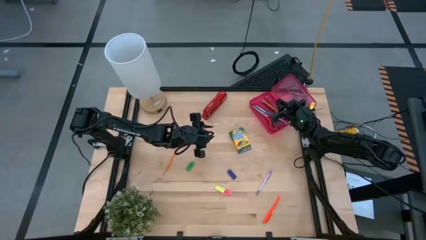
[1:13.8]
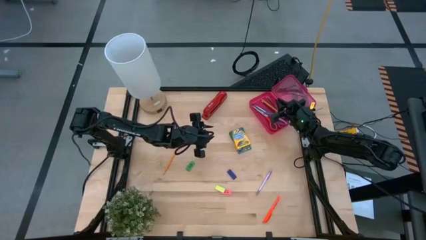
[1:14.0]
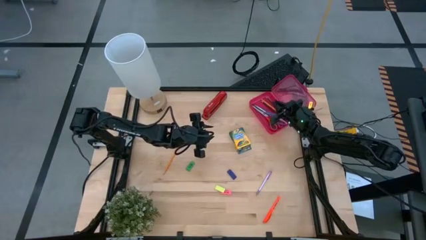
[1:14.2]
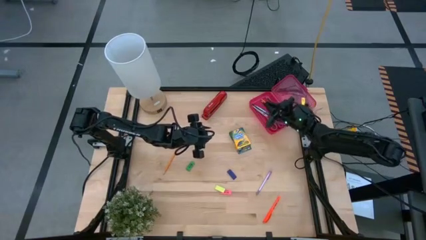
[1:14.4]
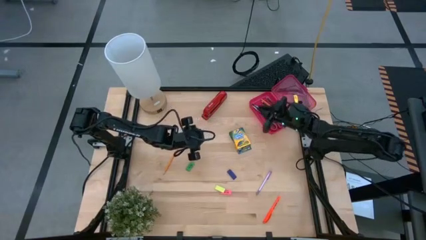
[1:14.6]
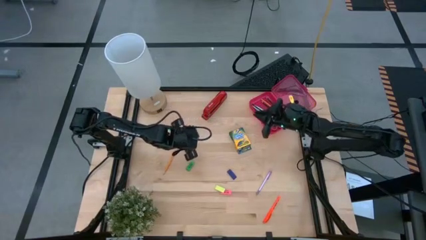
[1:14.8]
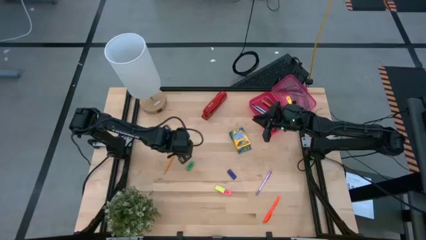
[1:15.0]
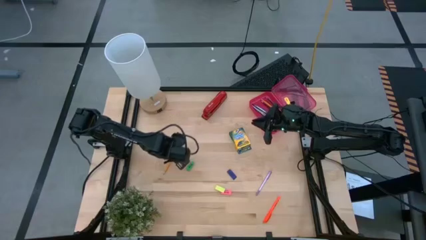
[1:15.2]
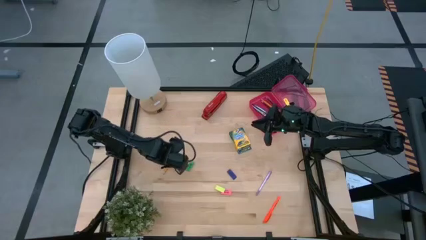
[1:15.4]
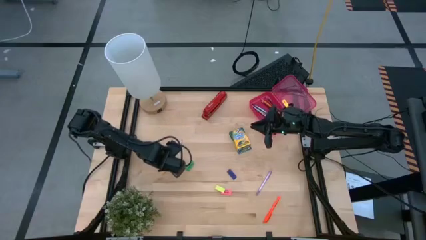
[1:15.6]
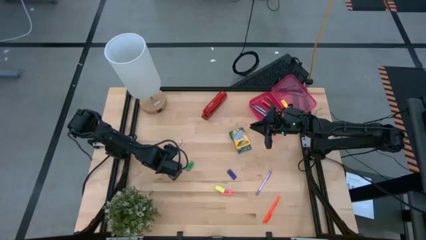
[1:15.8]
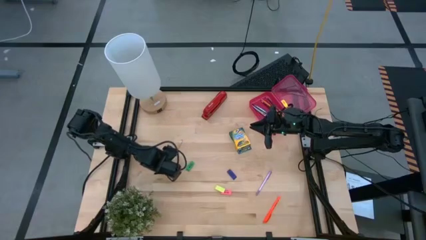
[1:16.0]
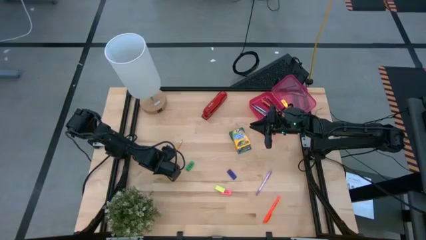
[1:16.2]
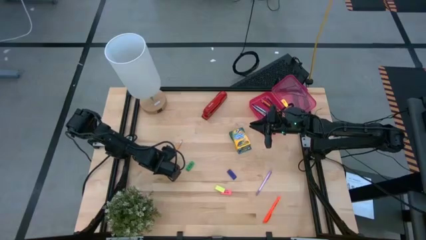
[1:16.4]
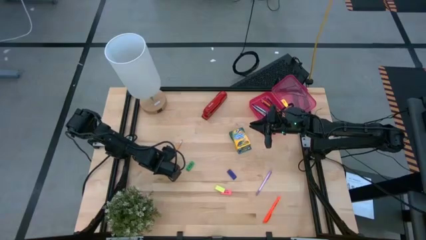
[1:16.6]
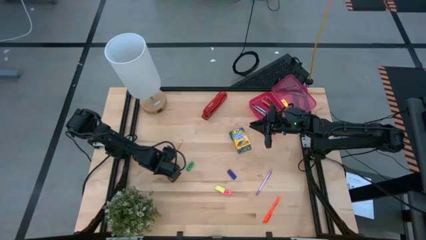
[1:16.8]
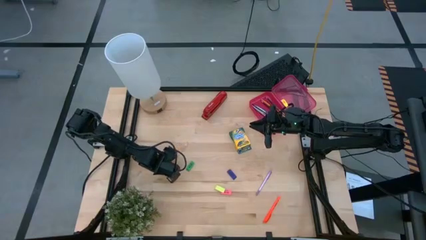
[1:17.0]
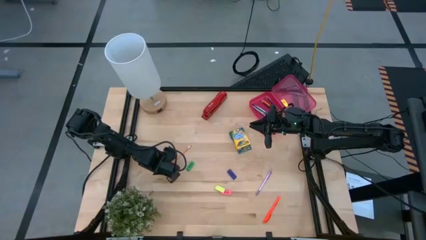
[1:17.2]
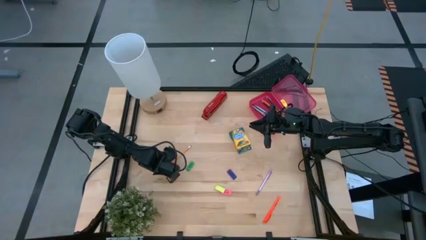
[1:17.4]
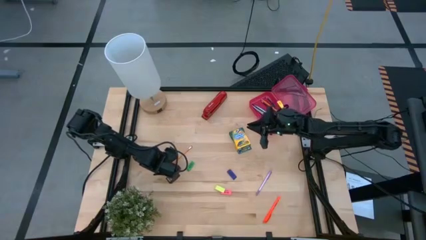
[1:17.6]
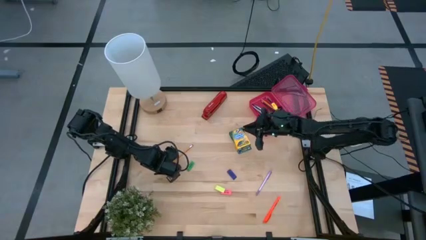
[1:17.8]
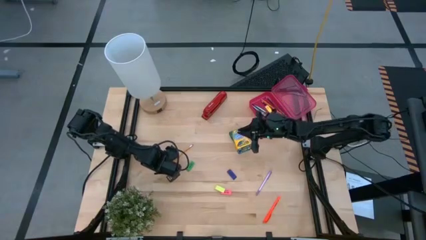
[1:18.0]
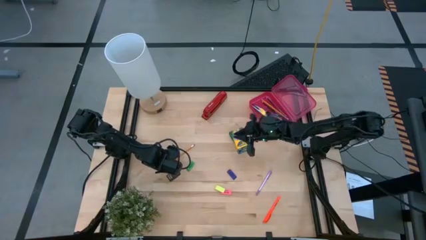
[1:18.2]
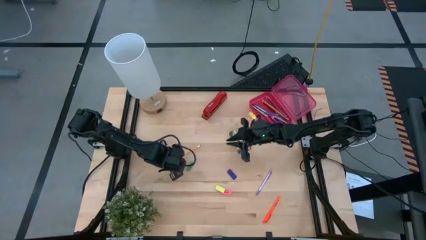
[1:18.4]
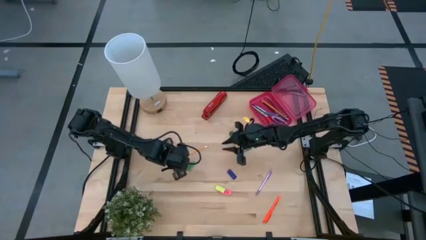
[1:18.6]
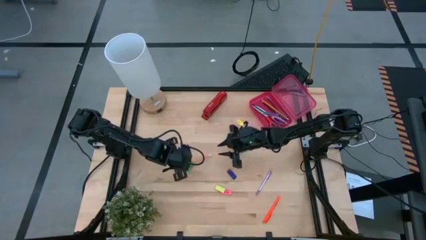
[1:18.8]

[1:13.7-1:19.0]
Task: Pack school essentials
Put the orange pencil into the pink supply box

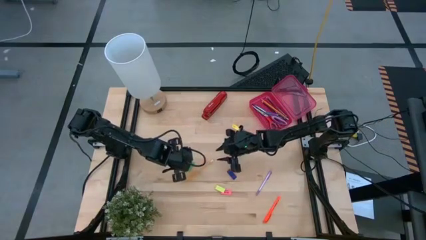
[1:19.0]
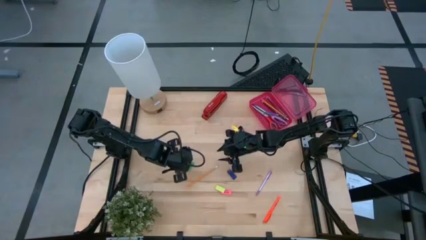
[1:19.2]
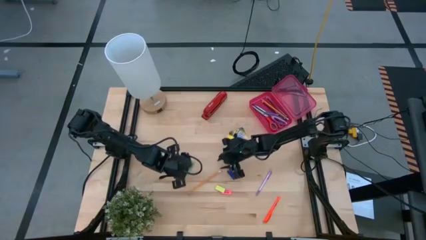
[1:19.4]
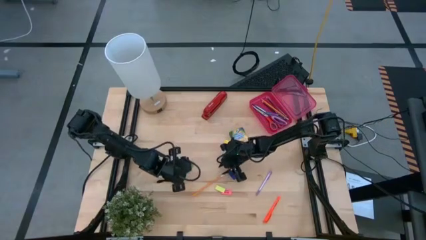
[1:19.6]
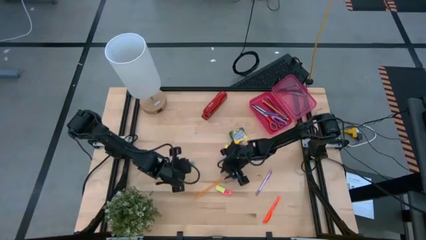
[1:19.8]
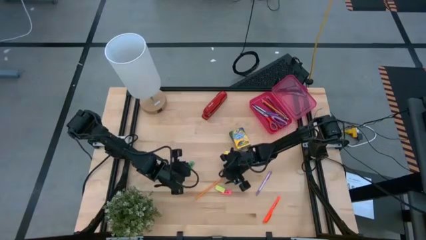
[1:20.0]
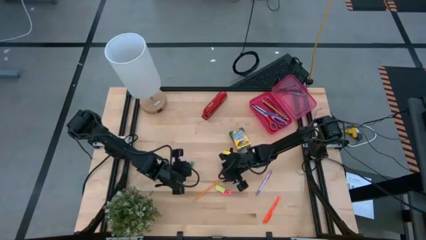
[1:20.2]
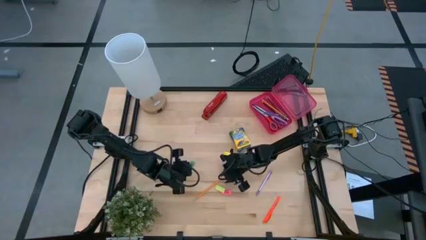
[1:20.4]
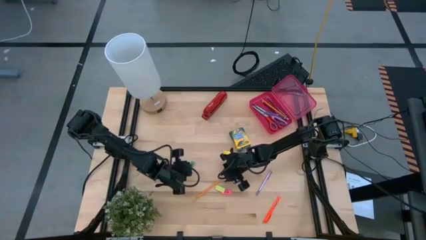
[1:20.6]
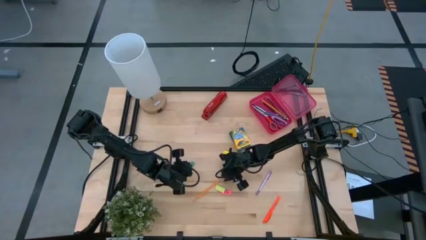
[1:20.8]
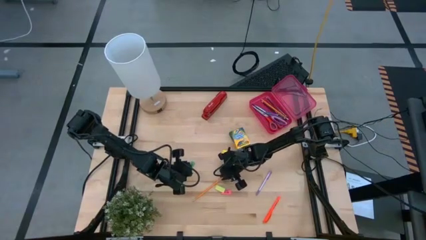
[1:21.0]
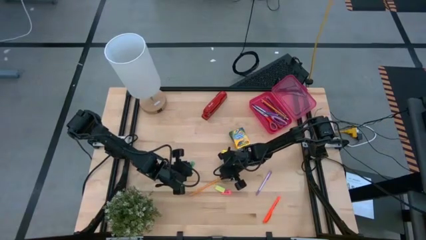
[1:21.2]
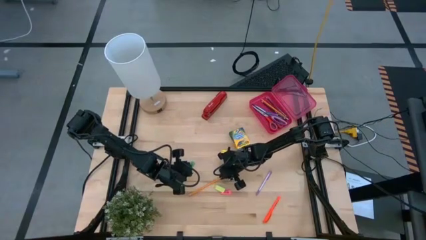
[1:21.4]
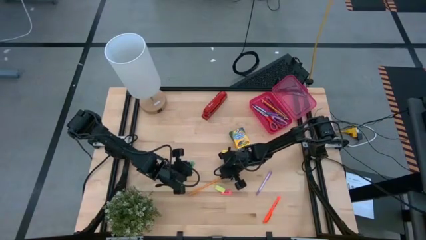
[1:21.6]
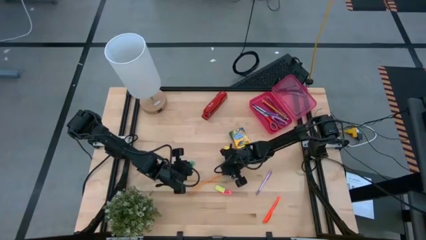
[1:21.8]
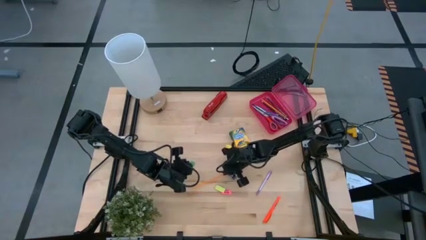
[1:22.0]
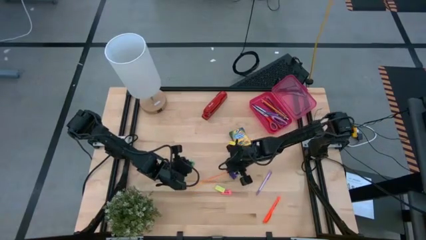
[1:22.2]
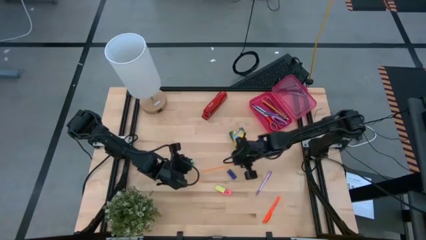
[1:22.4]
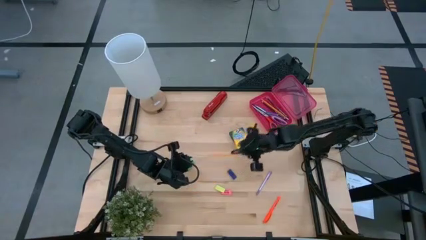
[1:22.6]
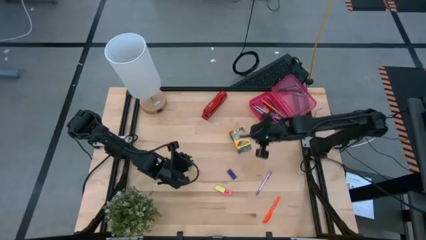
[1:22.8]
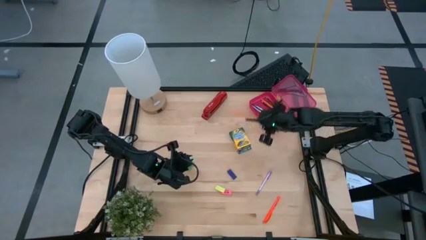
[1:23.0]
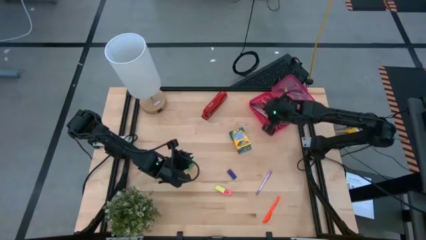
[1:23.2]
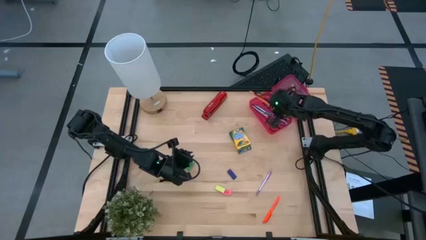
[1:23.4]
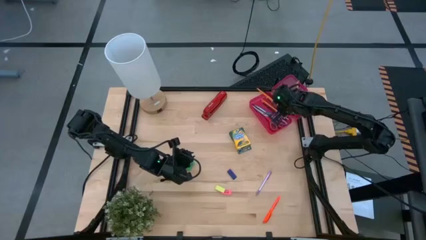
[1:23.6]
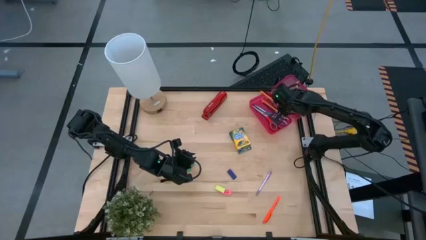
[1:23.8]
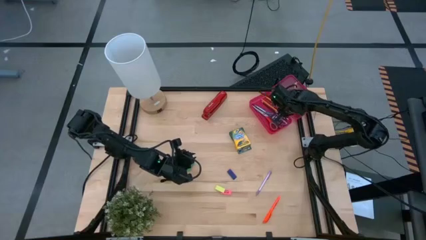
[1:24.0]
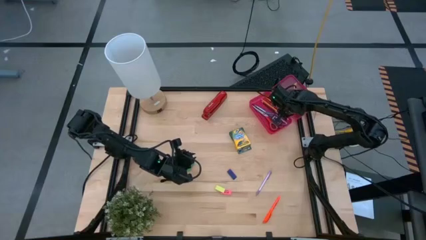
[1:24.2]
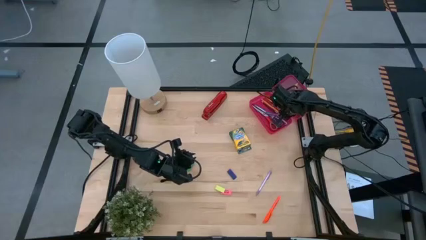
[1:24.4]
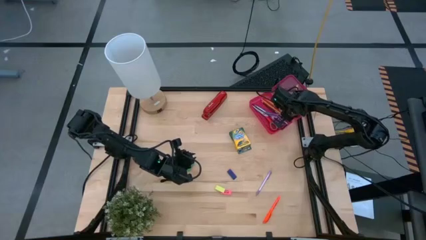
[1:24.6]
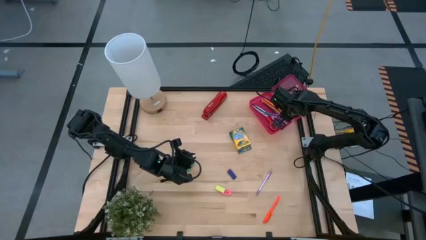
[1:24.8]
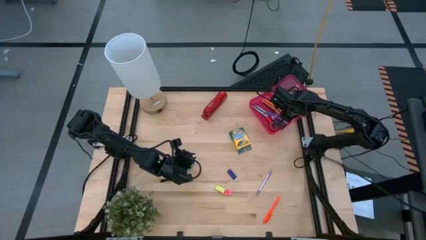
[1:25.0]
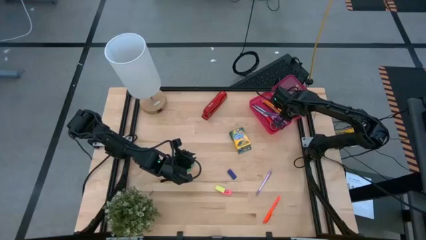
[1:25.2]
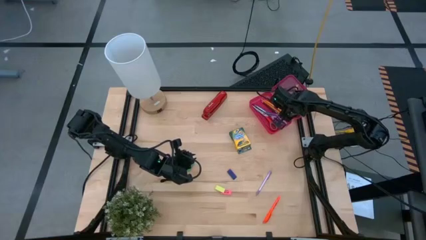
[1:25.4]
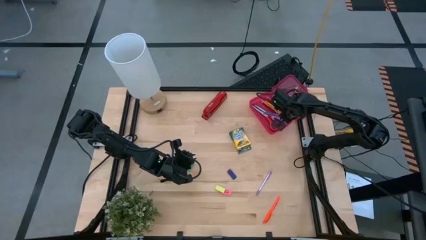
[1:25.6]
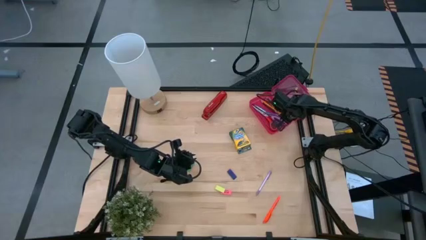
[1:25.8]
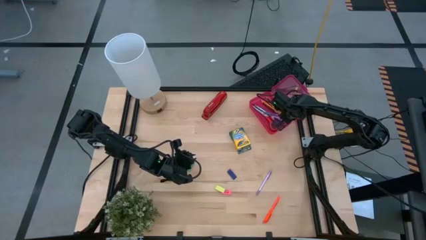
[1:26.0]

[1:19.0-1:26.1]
Put the orange pencil into the pink supply box

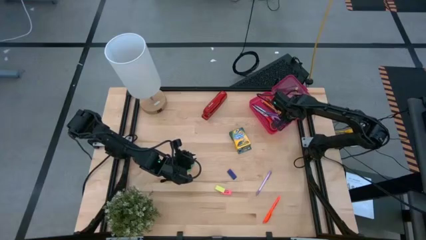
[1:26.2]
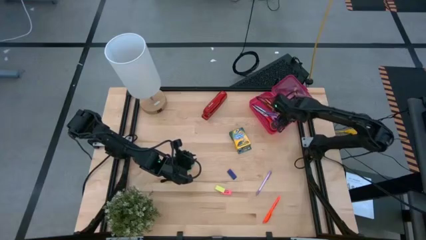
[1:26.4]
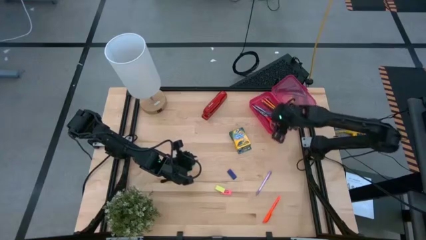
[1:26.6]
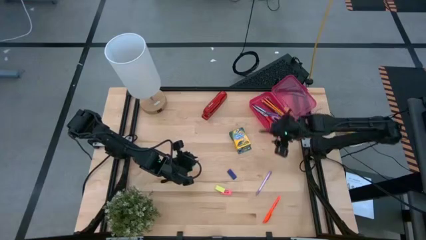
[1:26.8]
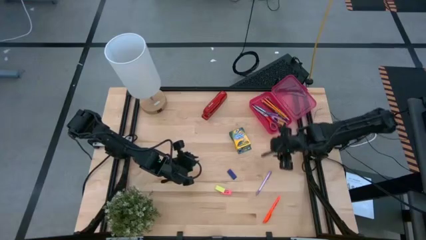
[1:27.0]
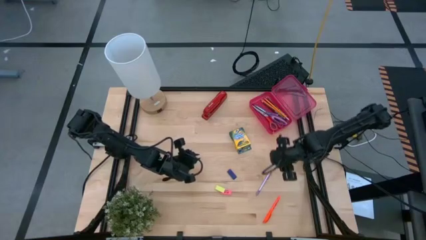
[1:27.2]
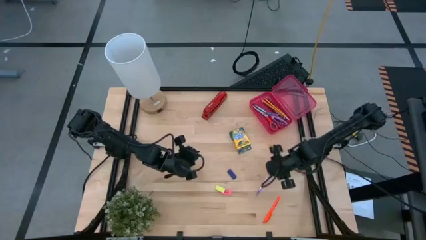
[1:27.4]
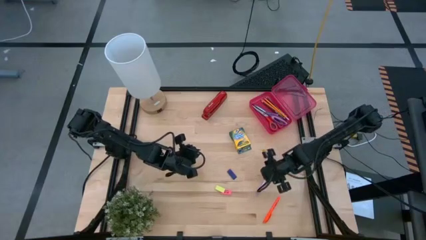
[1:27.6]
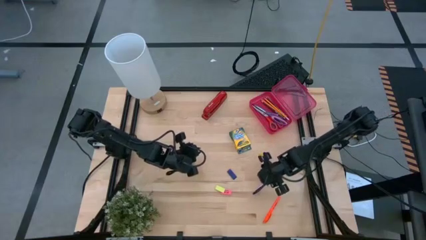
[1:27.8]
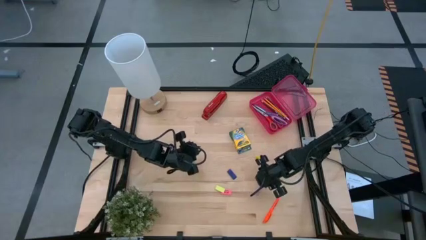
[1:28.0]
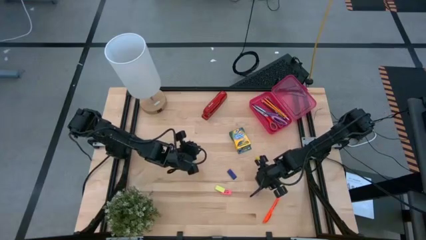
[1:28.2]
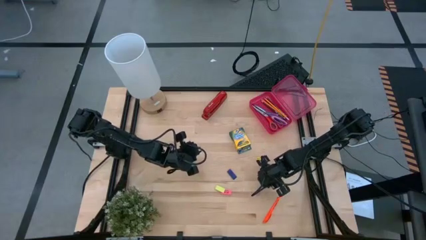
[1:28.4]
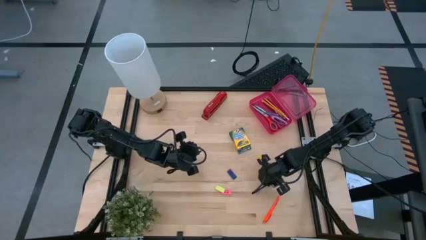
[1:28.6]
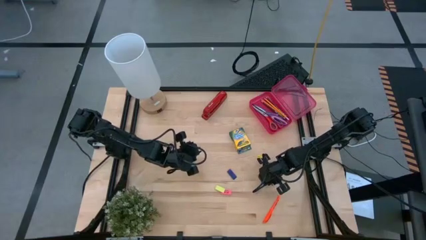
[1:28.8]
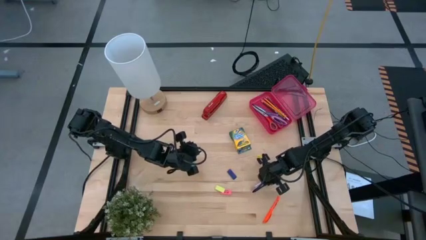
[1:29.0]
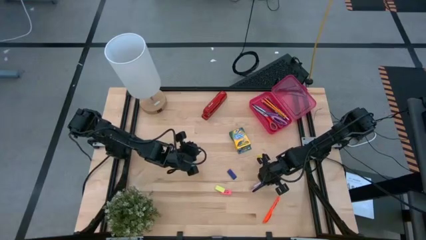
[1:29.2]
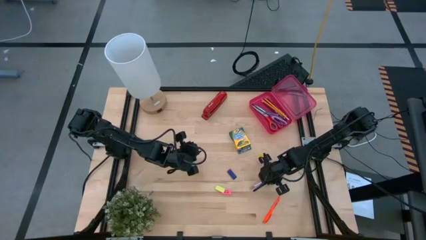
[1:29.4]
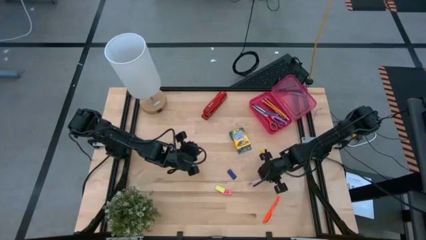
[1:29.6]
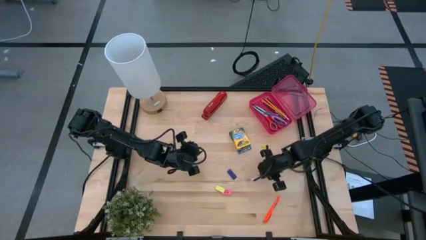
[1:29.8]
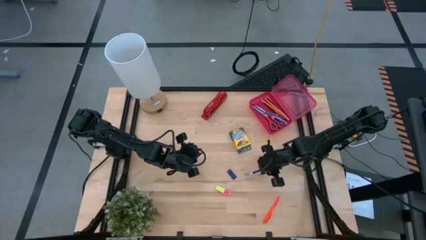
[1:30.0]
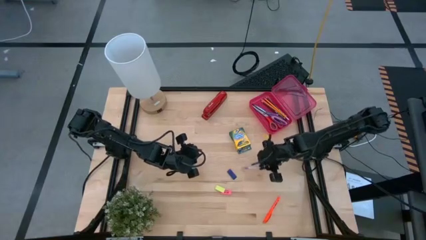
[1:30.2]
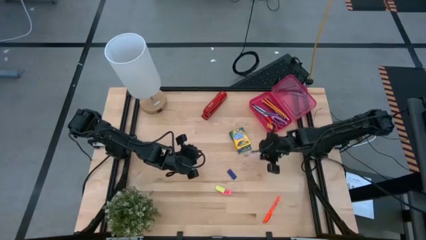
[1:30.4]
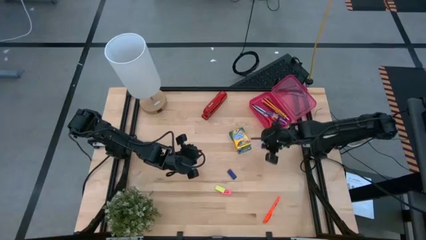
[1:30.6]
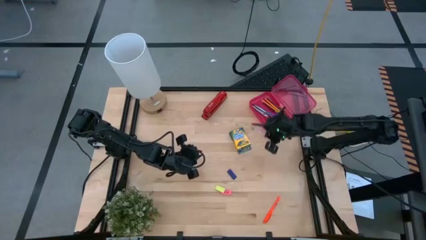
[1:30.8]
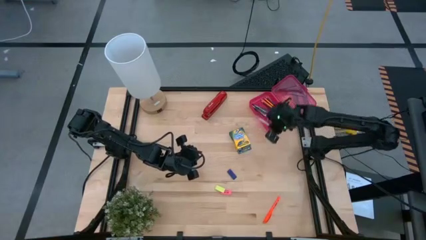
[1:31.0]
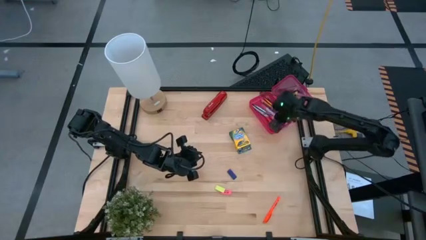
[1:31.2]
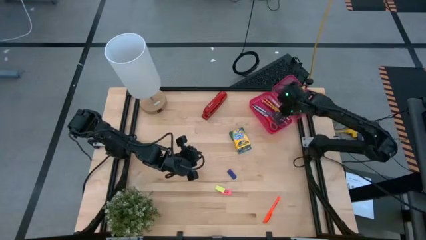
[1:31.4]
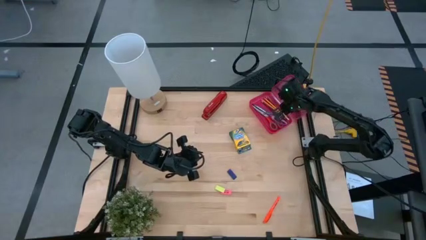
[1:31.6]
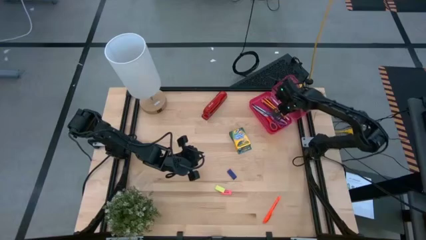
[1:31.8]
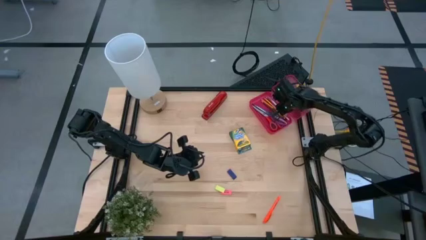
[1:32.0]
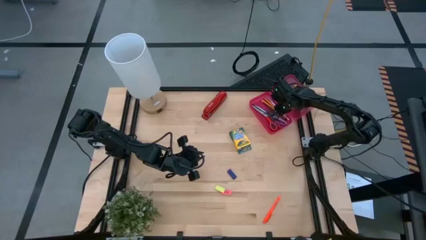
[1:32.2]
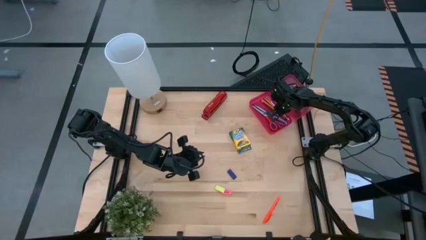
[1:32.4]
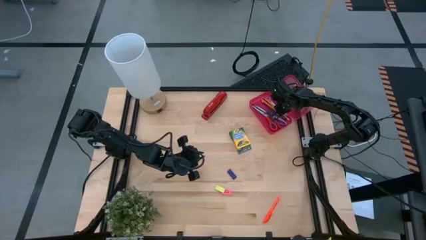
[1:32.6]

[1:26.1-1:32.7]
Put the purple pen into the pink supply box
